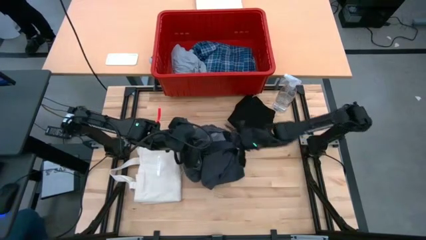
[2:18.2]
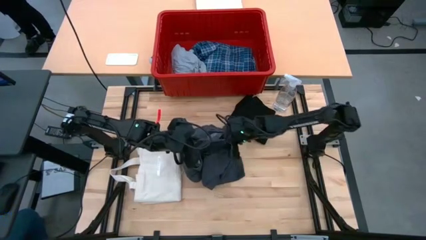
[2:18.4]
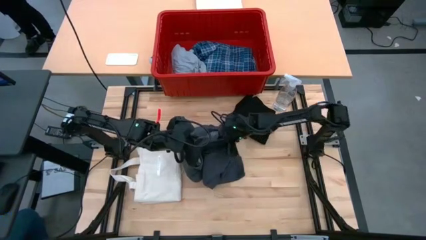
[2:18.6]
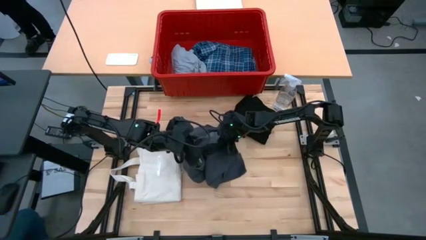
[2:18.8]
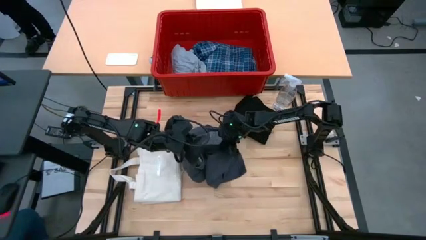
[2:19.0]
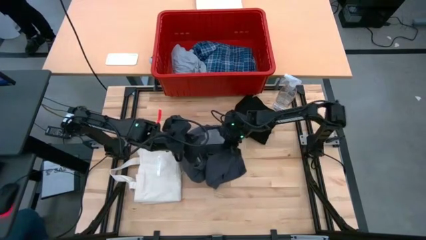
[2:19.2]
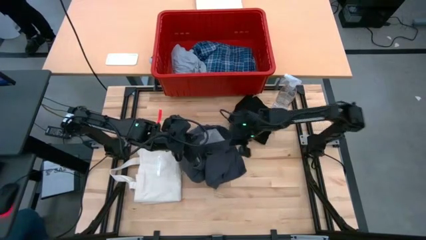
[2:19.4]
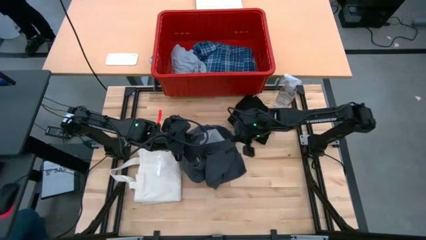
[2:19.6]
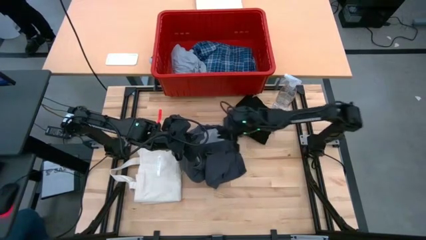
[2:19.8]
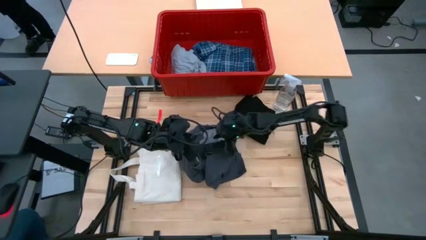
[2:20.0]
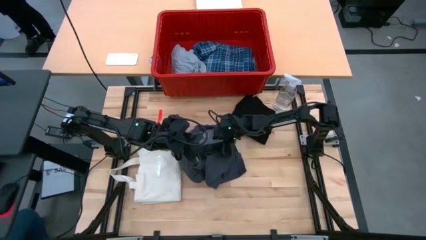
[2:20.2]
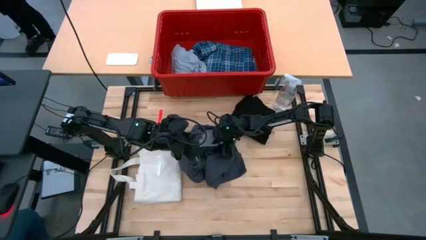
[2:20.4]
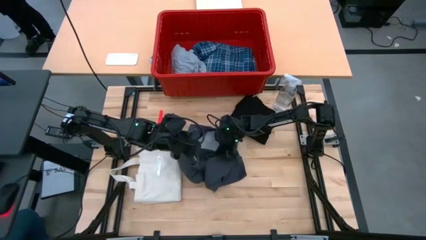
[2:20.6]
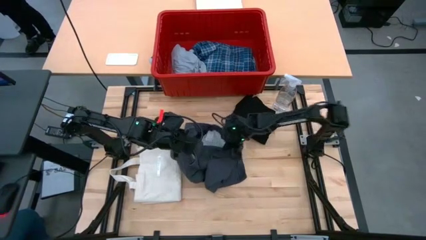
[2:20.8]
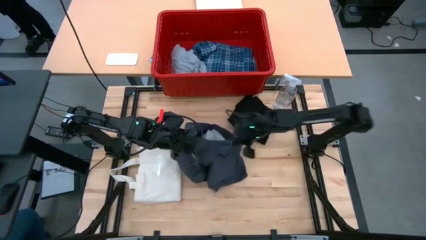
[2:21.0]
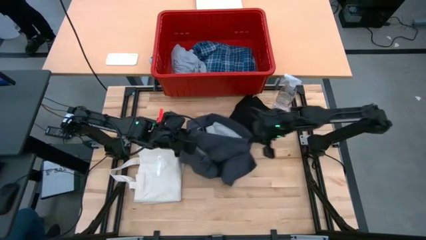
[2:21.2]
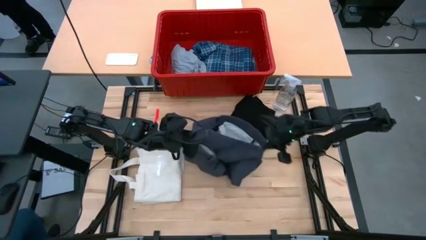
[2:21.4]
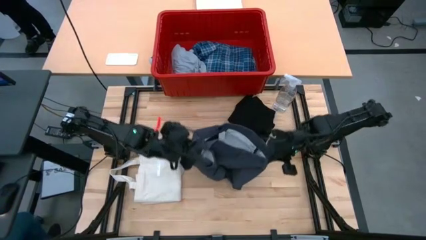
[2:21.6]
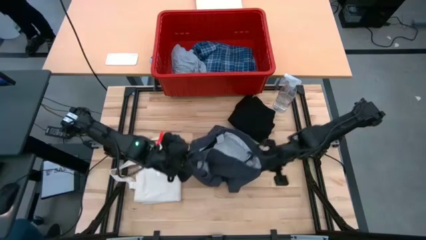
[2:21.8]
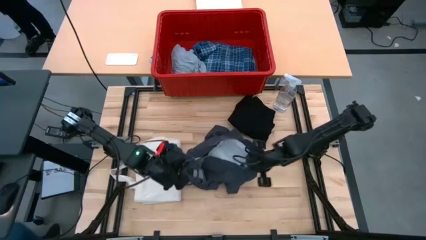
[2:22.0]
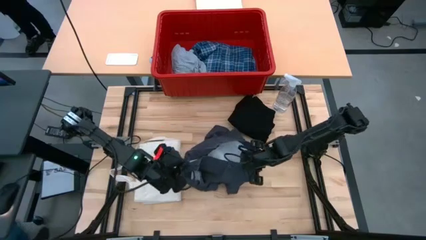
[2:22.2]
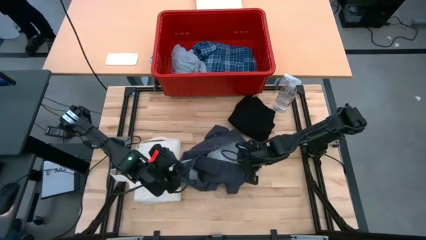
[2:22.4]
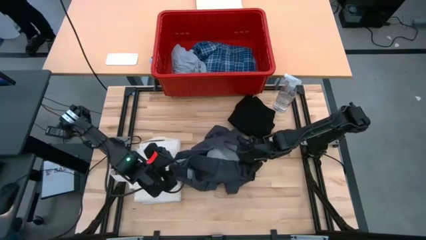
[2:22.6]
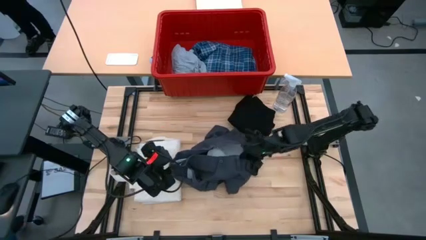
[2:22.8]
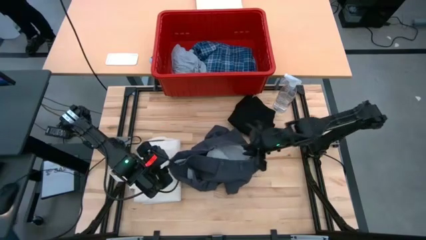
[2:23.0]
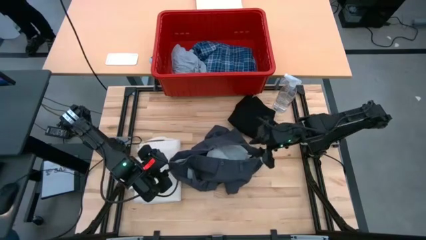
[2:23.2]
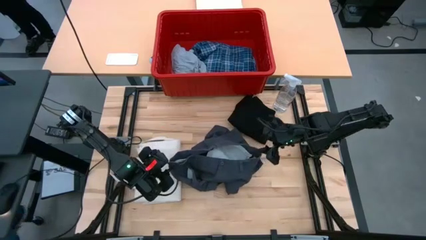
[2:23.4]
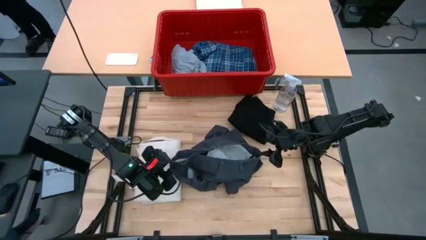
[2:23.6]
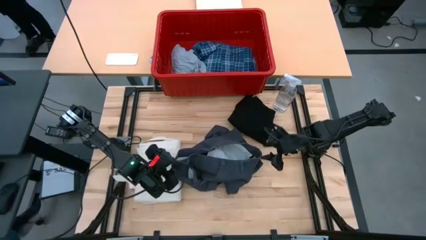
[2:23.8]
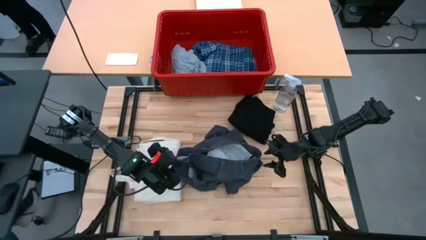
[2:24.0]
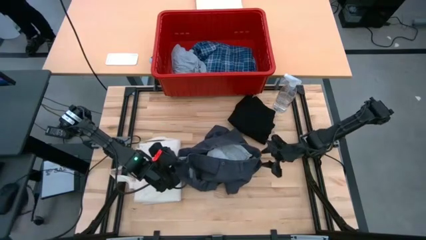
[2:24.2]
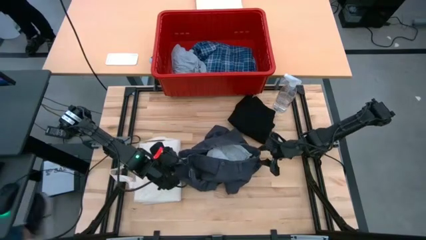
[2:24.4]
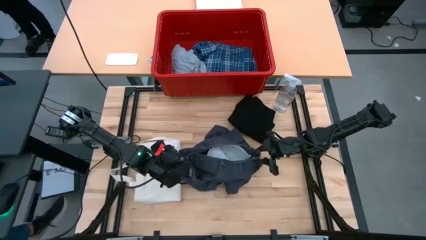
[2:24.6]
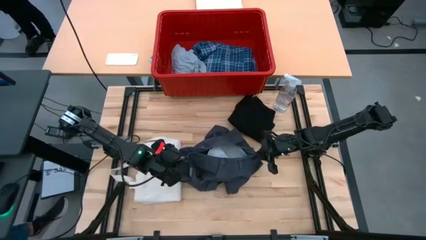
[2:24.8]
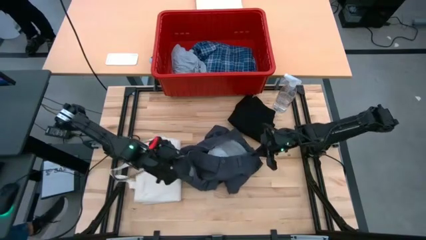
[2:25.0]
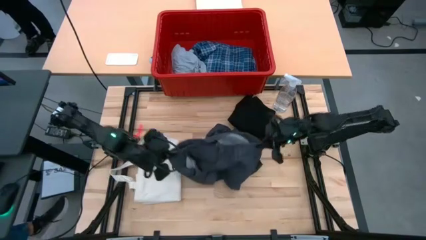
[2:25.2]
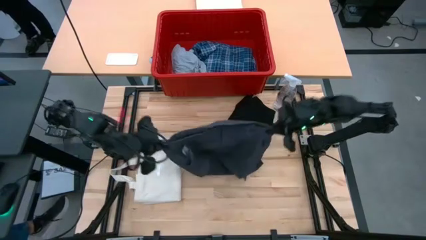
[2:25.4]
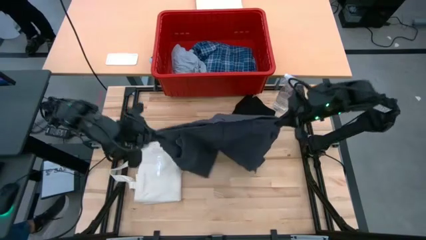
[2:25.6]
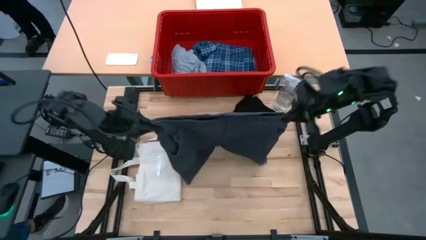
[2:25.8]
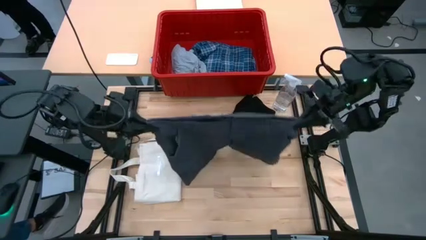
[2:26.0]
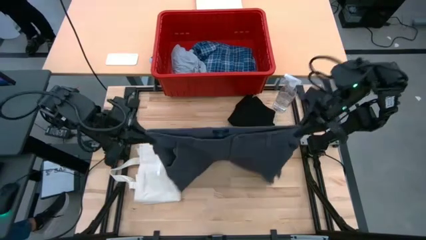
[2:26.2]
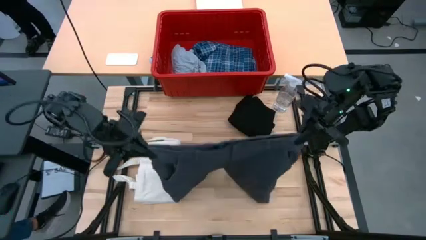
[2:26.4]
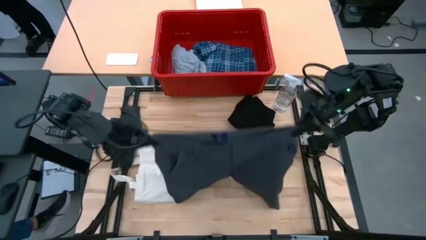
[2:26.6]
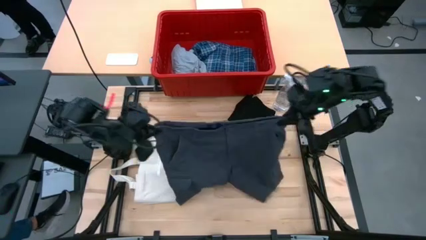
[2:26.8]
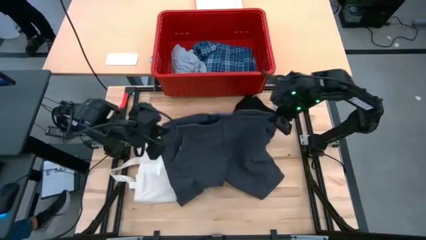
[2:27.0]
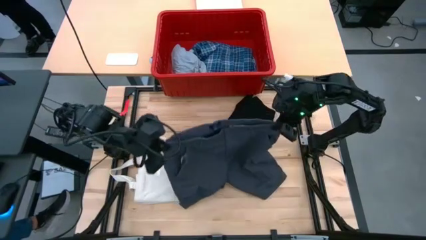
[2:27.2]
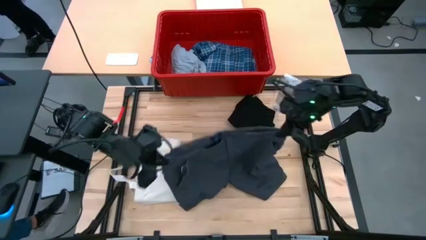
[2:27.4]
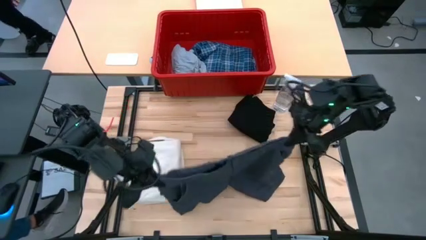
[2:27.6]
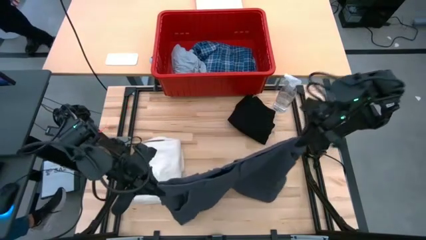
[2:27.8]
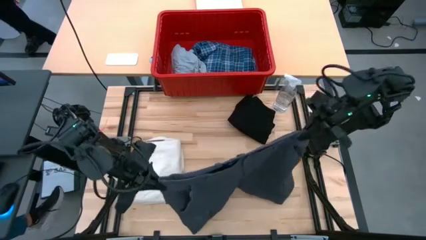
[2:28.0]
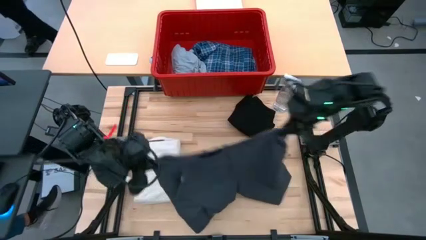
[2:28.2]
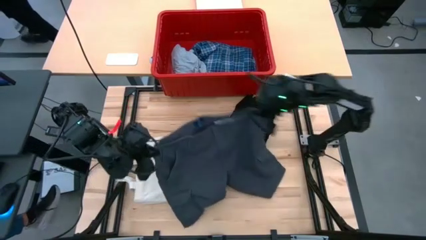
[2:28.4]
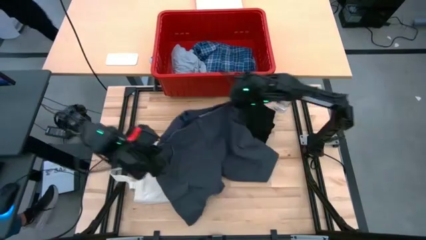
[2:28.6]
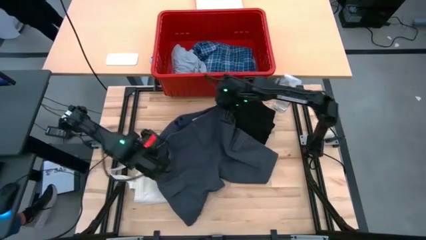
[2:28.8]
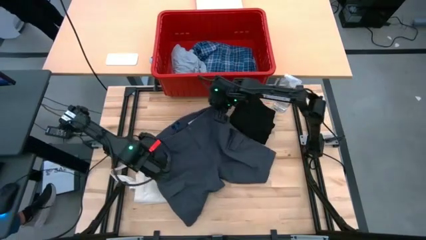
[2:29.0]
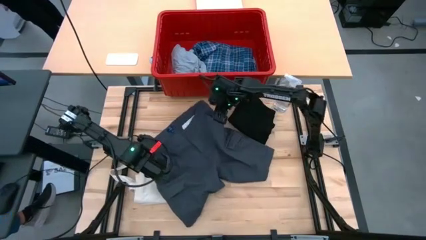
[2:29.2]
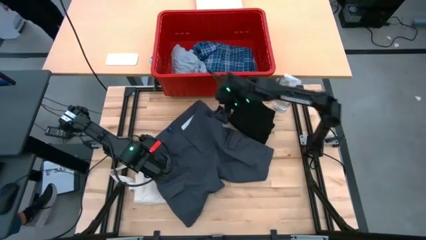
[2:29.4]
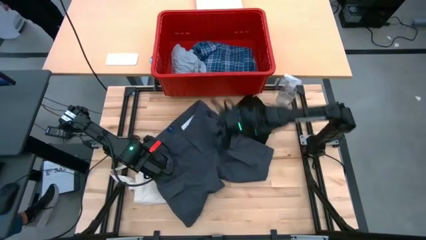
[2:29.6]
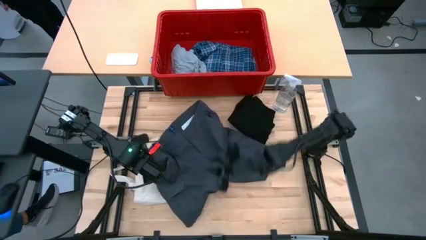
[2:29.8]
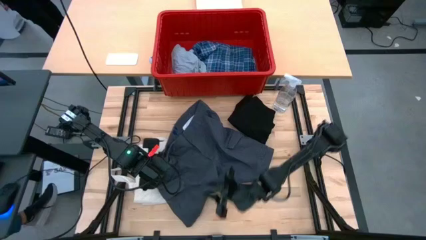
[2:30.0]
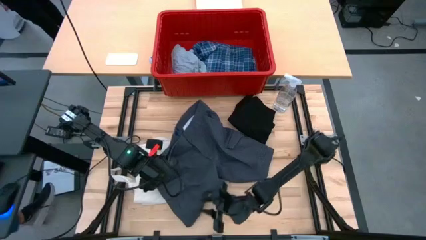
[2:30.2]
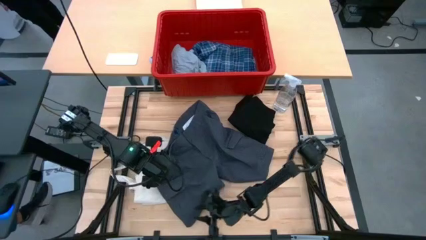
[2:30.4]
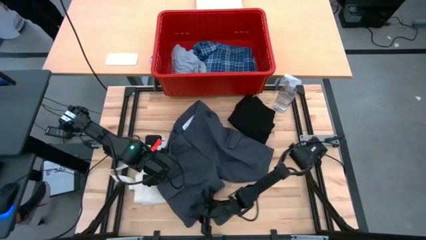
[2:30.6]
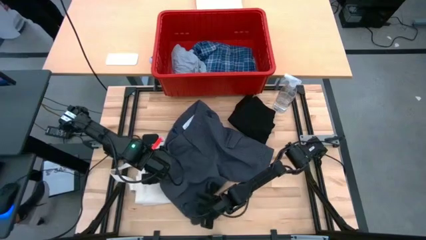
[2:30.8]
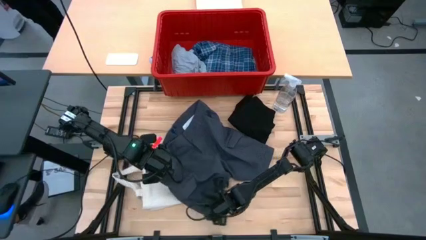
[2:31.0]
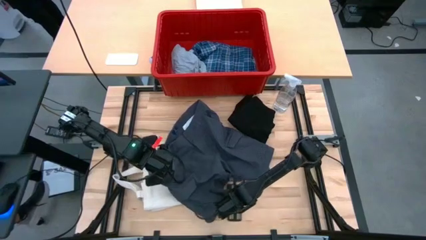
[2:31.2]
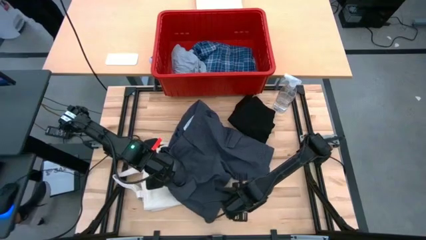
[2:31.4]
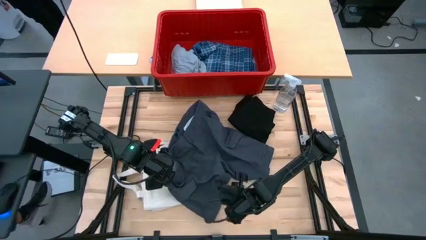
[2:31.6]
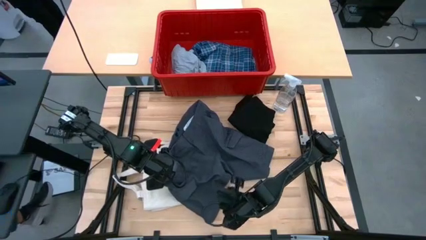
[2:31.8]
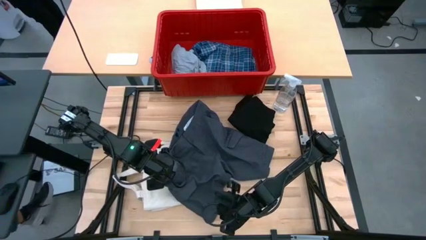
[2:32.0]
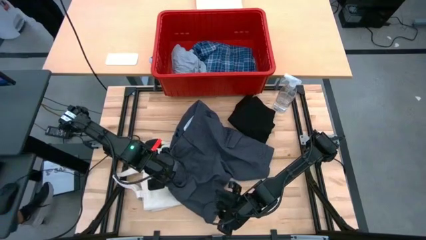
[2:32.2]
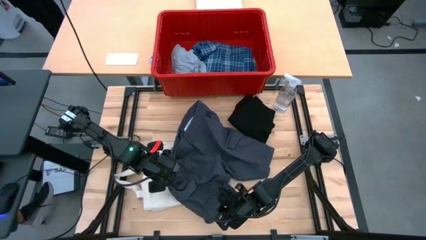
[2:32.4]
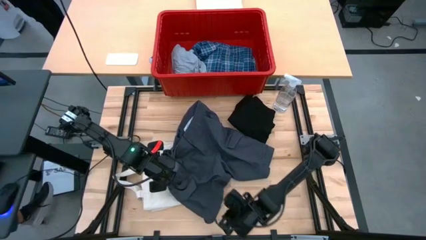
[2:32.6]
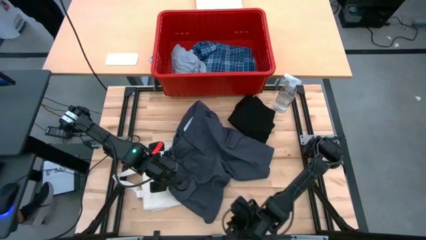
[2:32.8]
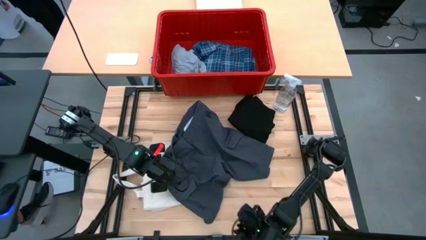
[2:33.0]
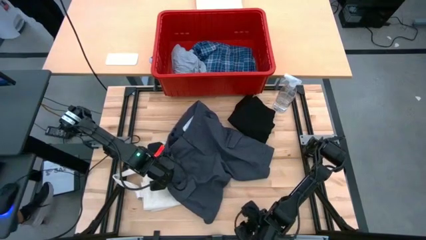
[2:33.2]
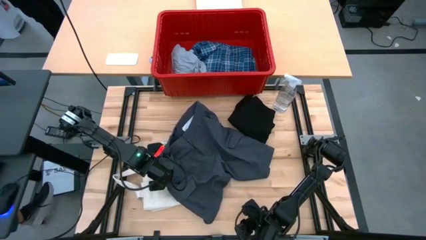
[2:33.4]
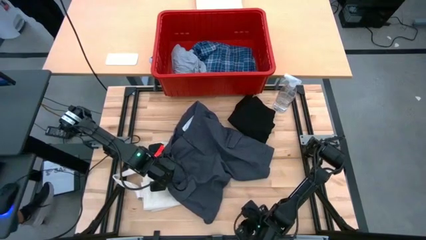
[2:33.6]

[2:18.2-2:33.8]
Task: Fold Laundry from Bin
Fold the gray shorts

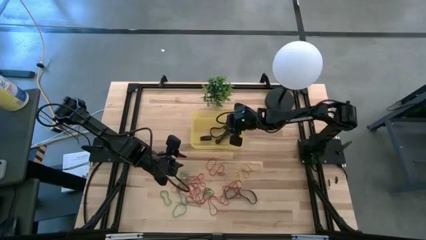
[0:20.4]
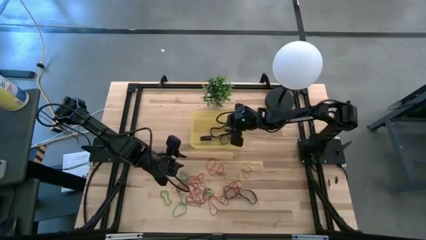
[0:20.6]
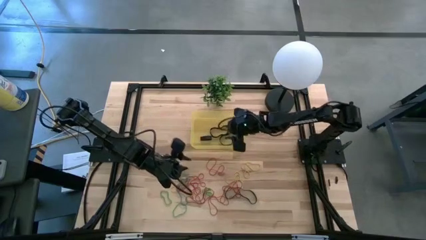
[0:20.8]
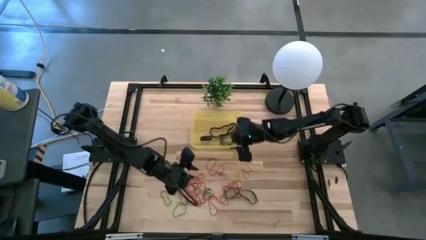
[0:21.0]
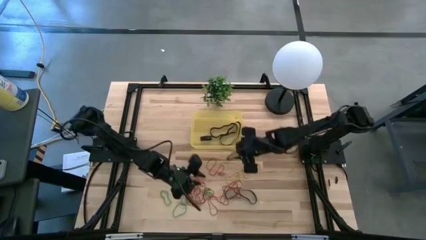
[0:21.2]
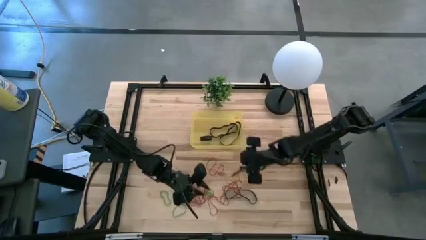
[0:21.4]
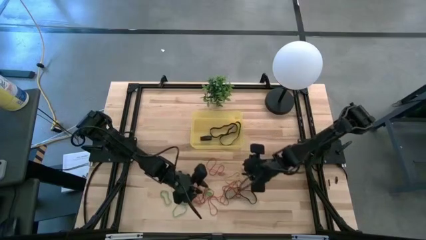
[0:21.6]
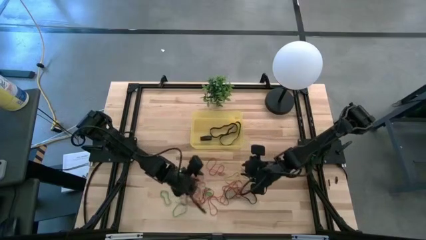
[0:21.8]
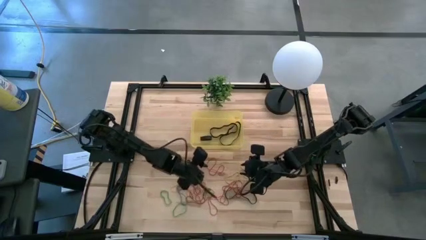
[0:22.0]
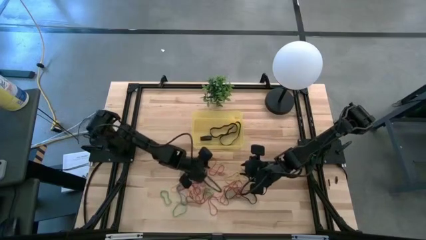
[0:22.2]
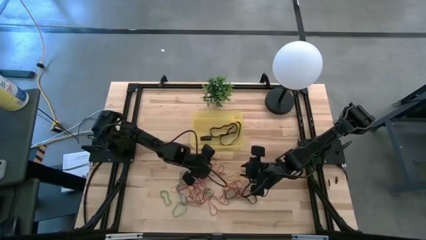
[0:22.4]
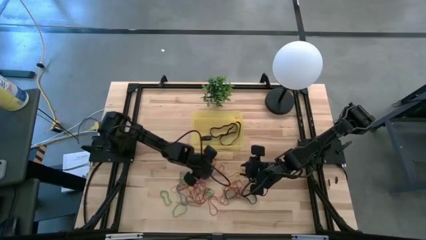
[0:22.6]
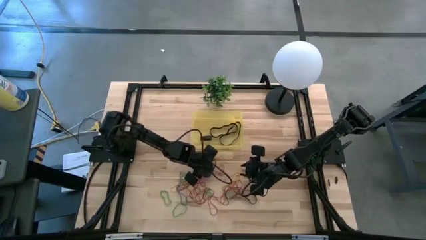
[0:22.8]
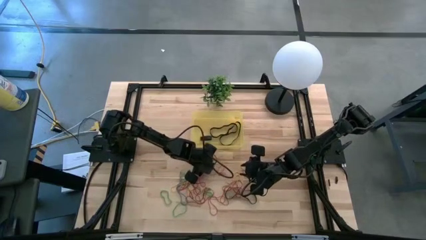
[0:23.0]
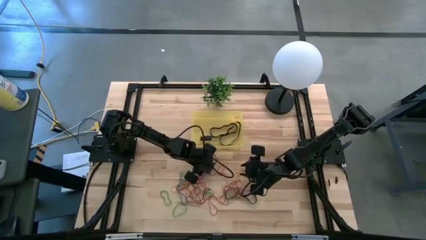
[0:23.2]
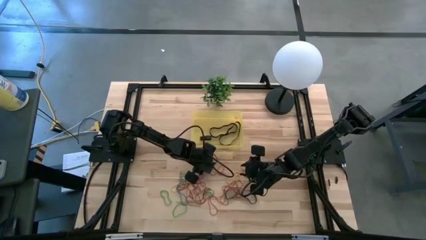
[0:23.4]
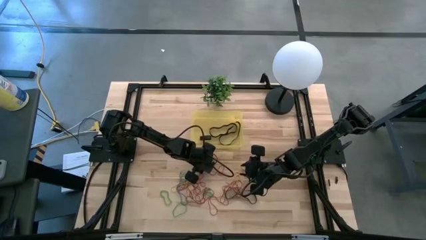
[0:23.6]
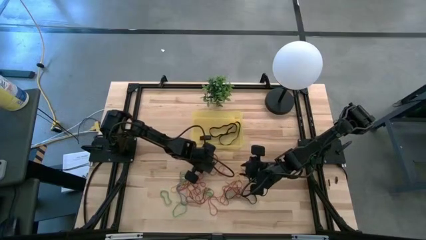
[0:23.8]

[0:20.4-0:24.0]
Task: Pick and place rubber bands into bin
Put the red rubber band into the yellow bin
